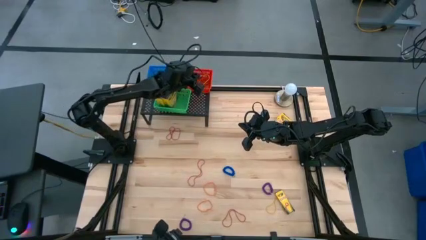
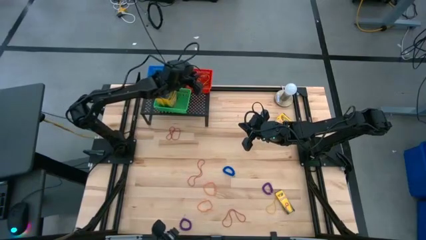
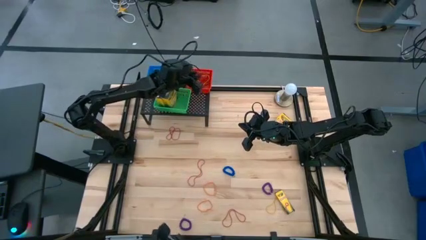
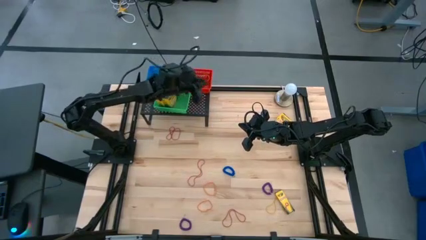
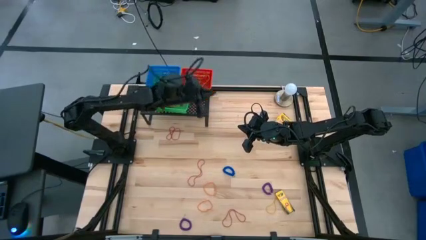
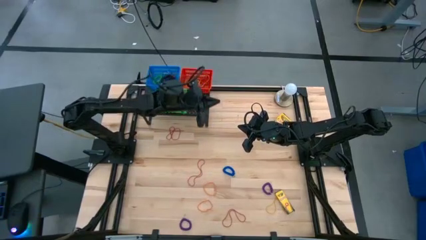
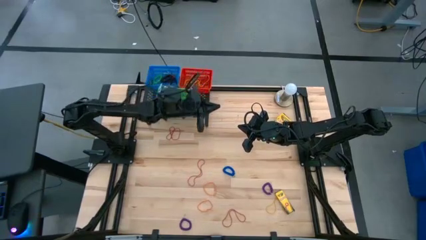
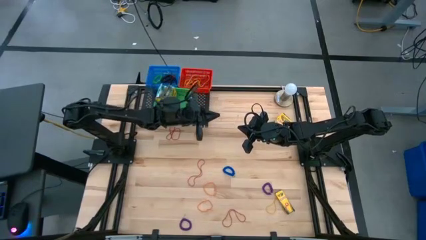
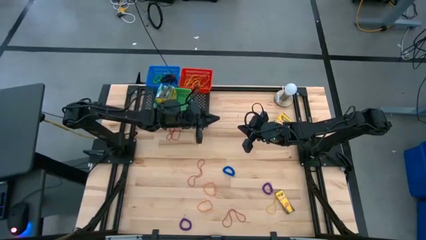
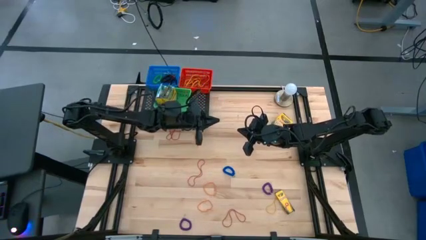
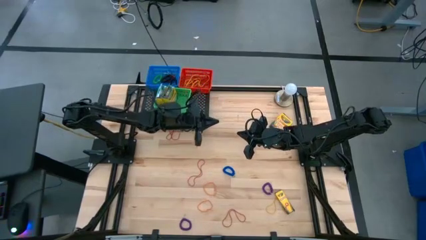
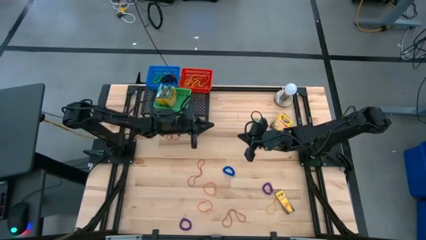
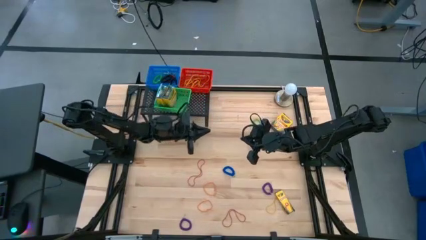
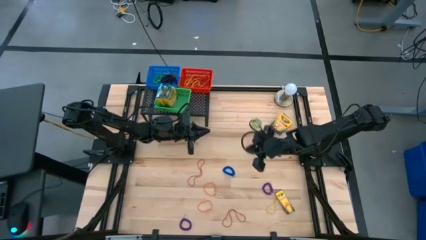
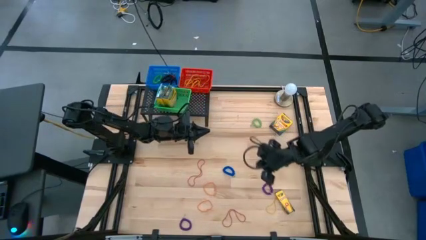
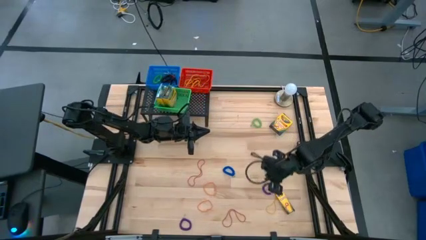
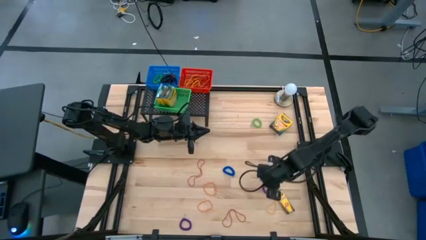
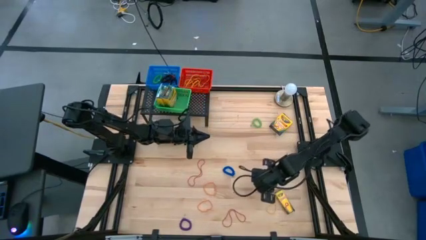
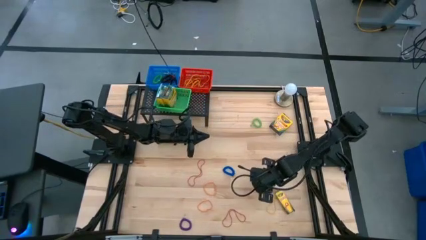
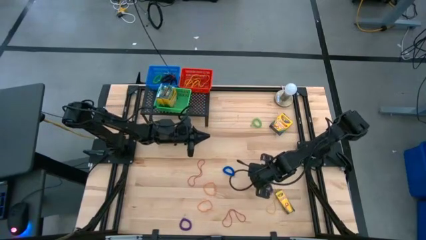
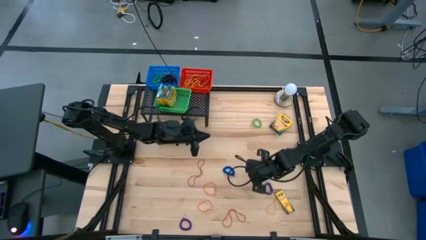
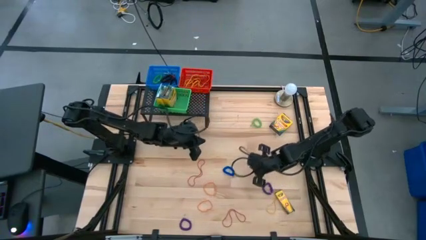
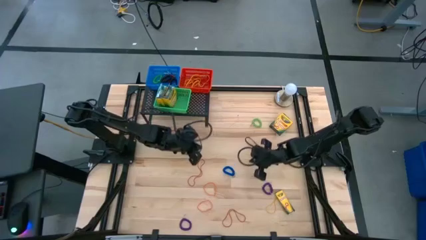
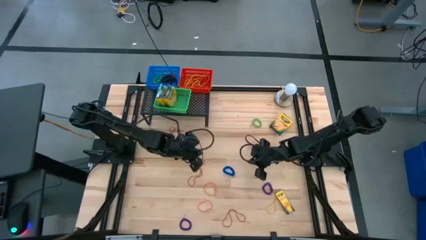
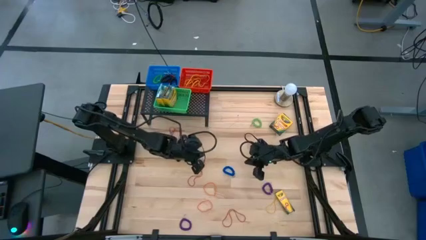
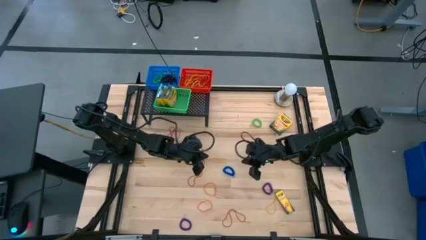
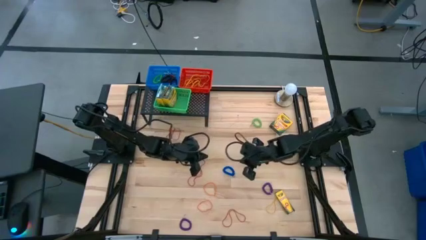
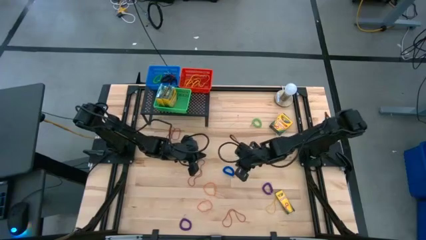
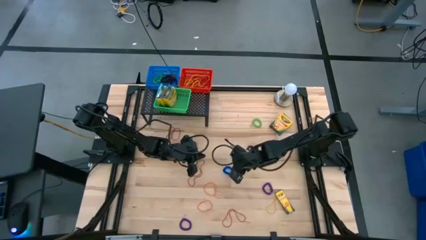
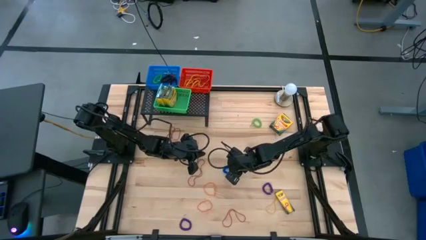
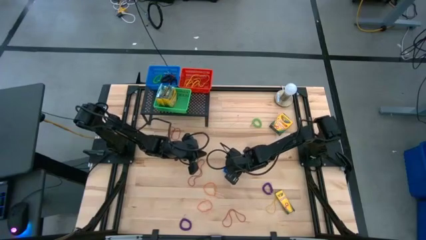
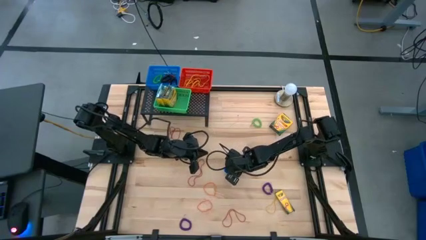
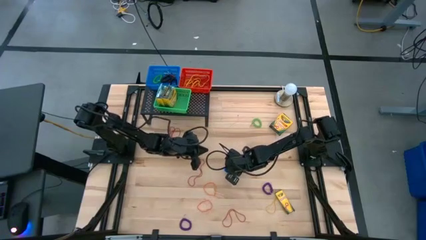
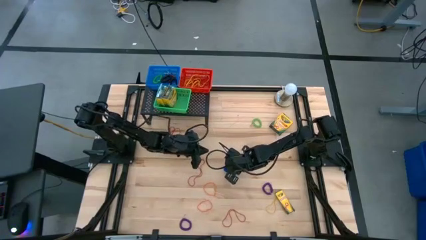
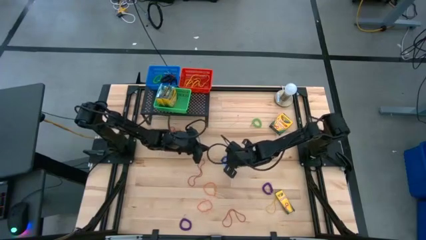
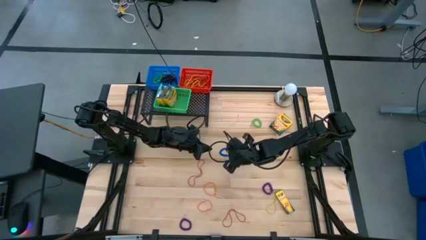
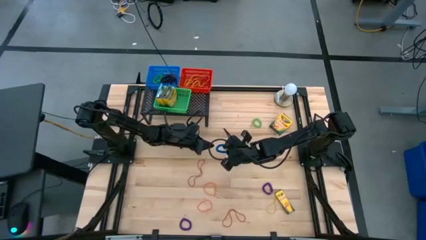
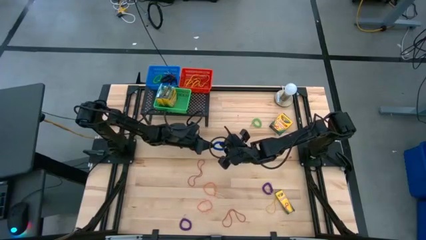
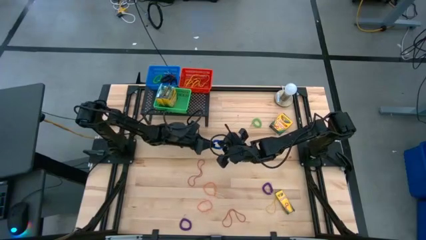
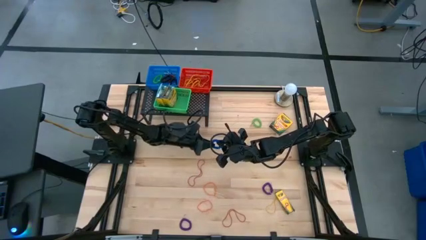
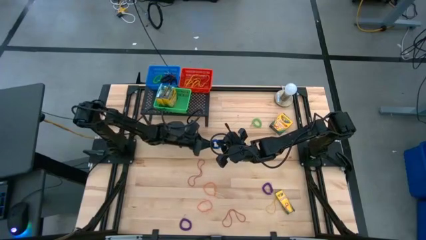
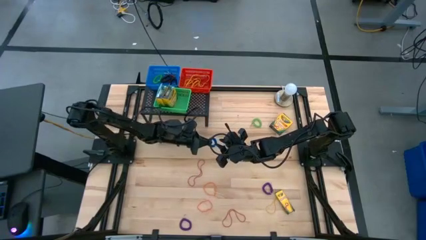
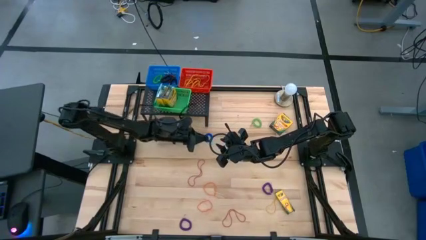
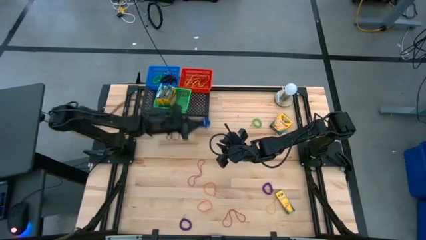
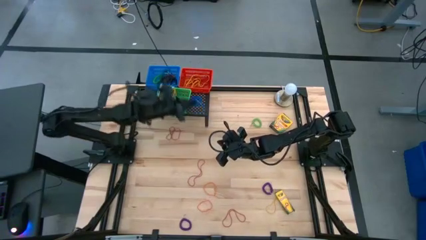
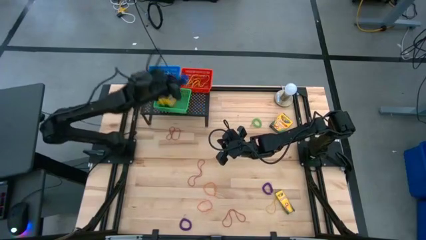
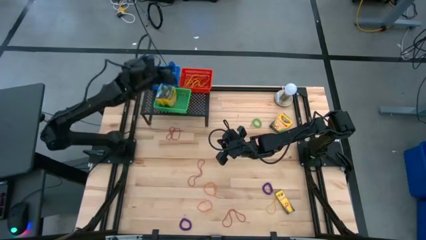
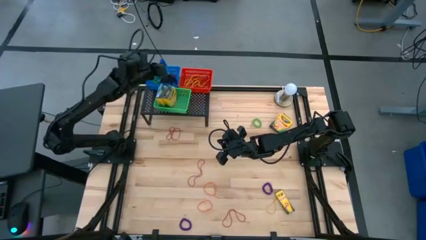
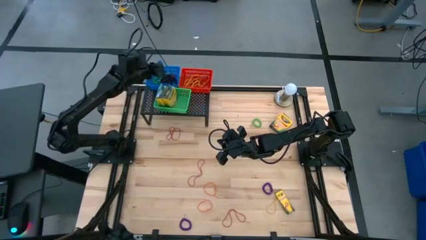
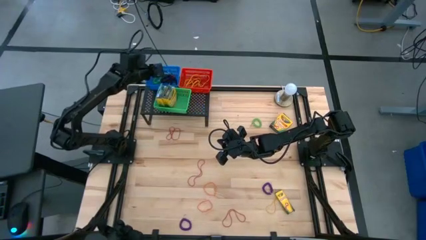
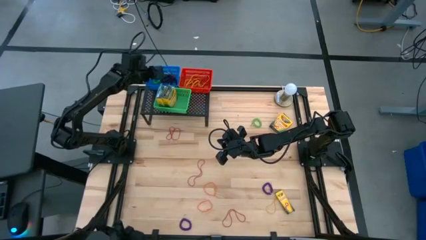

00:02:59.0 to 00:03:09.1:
Task: Pick & Place Office Desk Supplies
Put the blue spring keychain into the blue bin

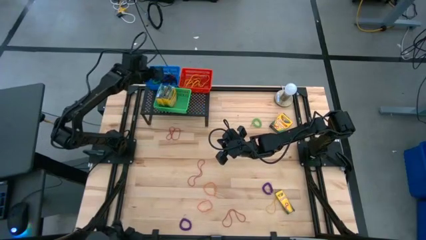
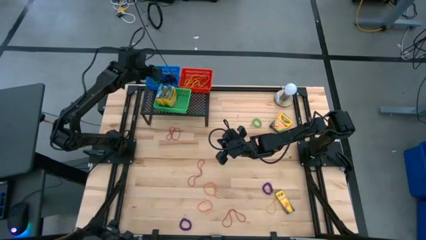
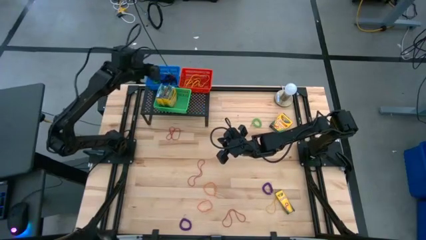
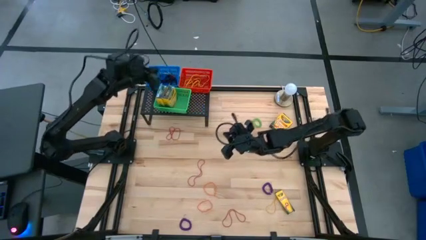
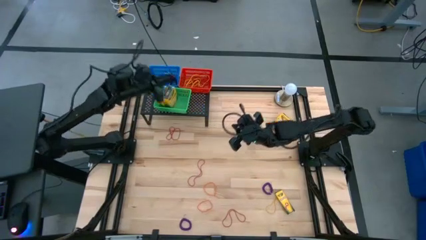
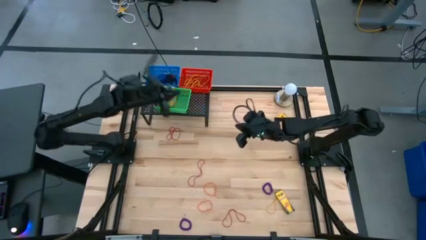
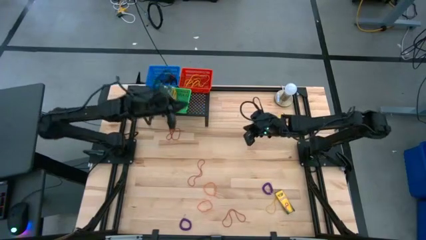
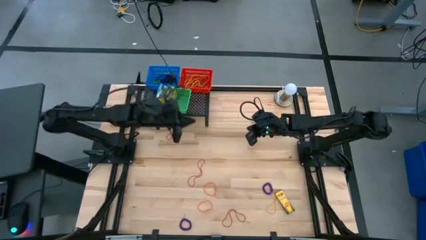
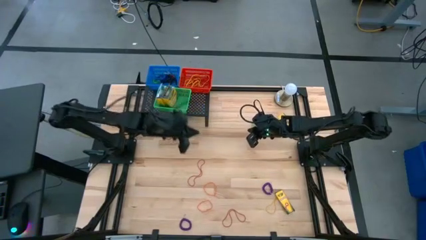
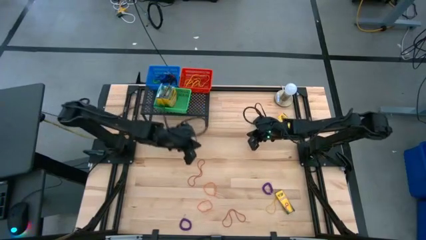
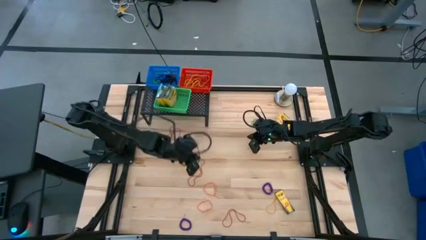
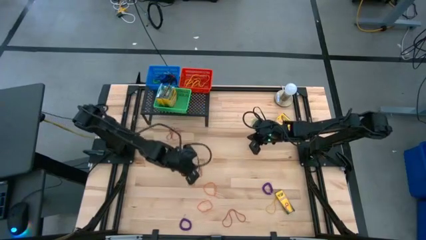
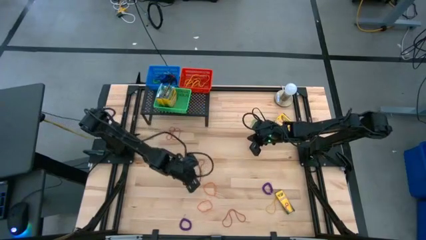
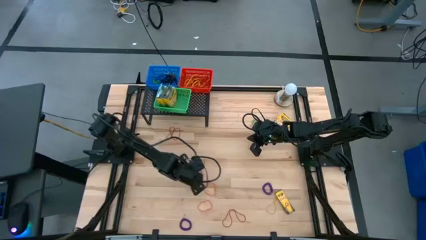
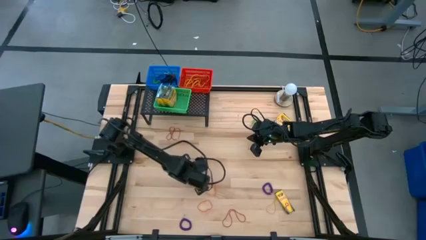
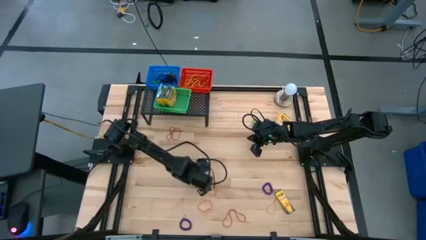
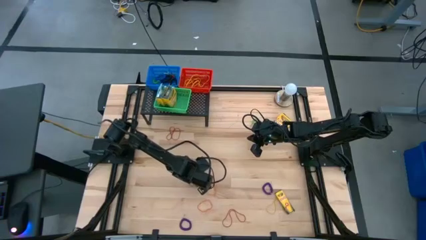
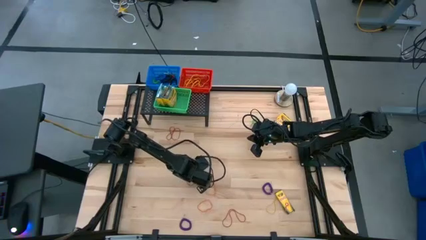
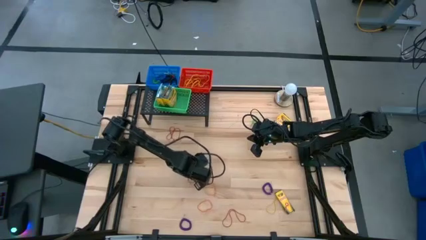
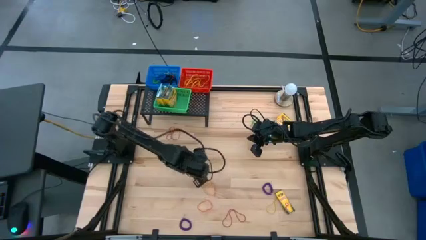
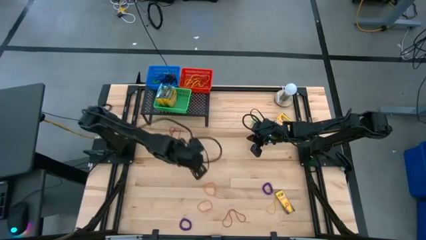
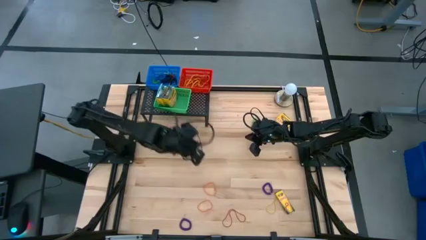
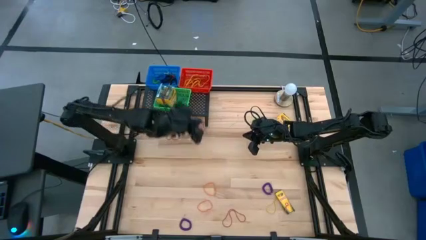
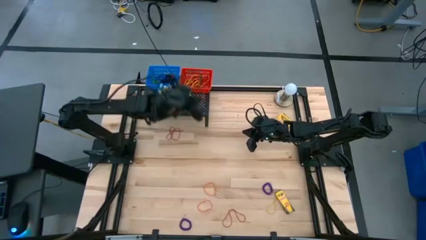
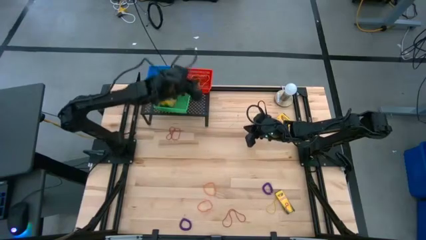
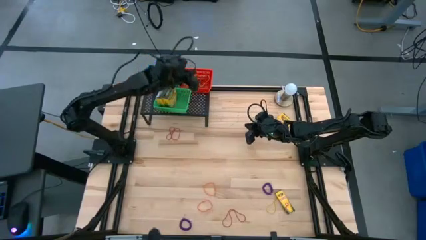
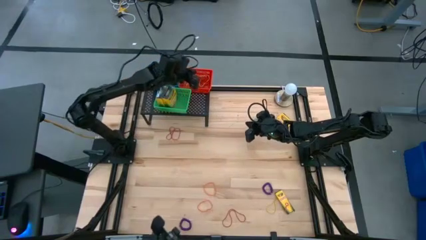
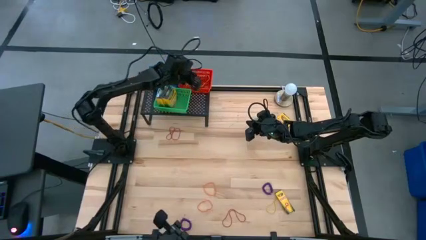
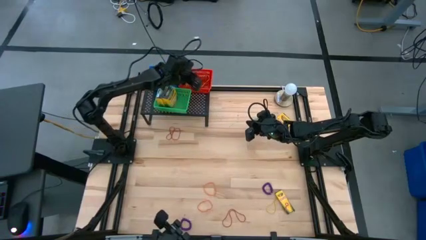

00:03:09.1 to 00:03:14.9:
Put the red rubber band into the red bin
